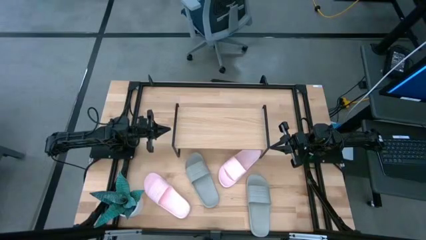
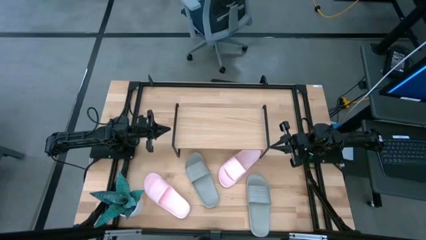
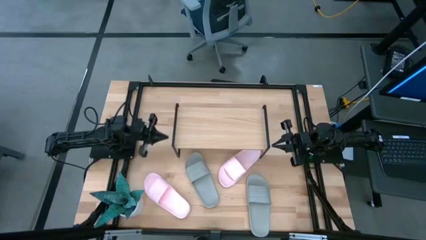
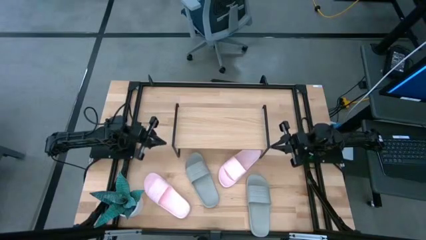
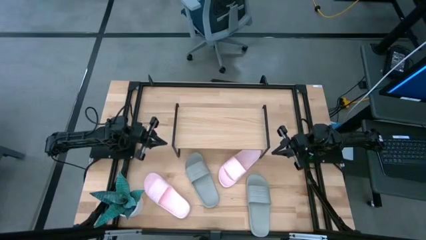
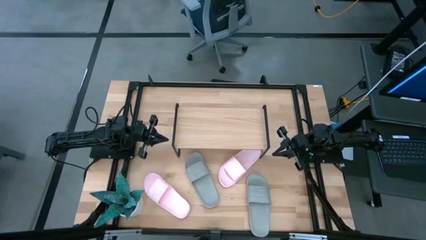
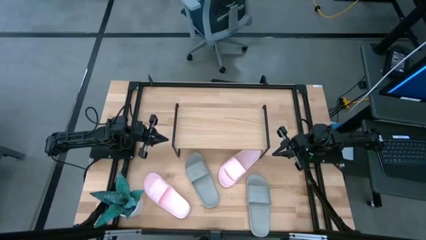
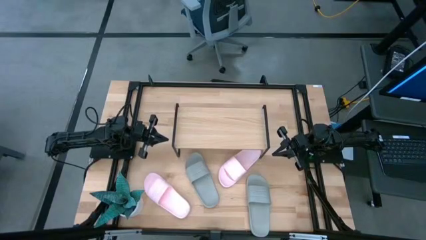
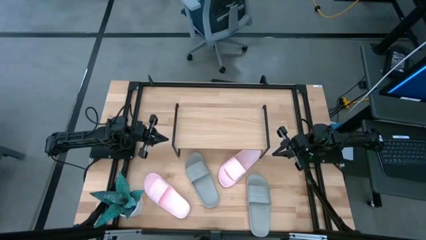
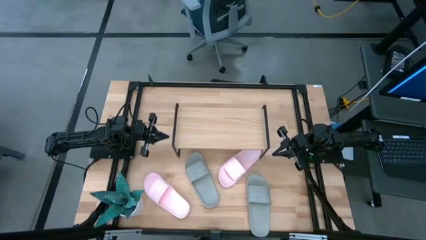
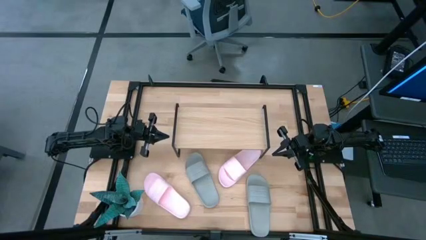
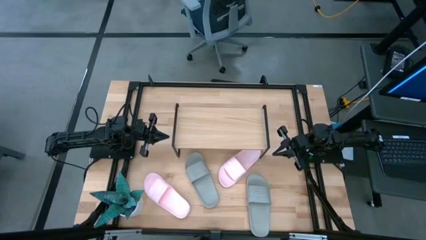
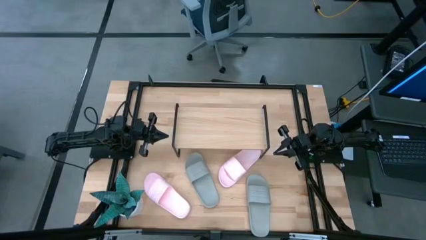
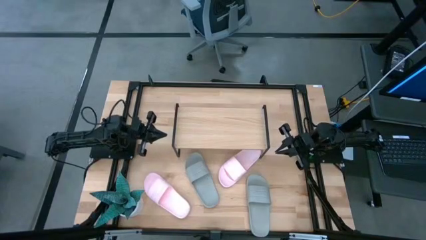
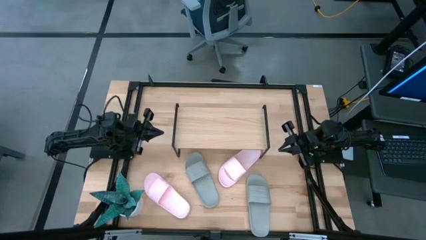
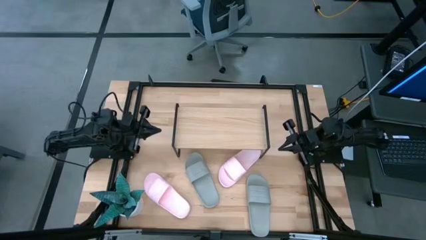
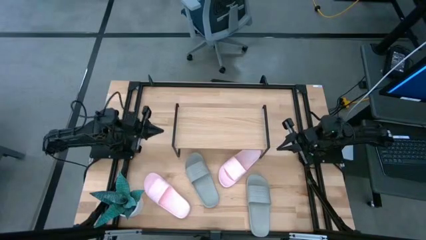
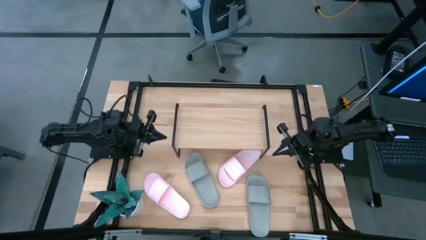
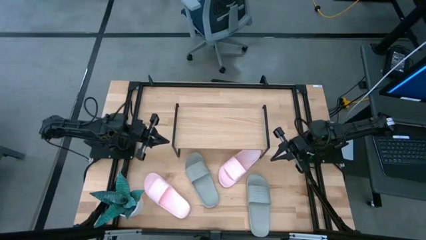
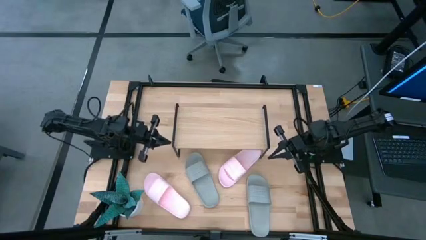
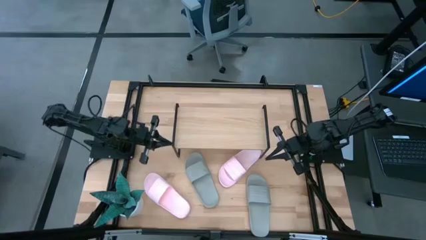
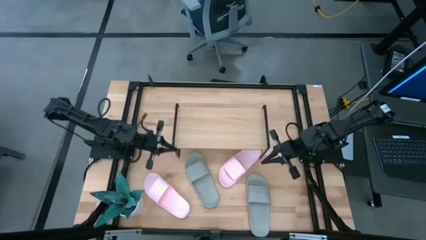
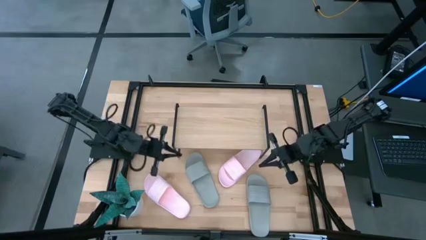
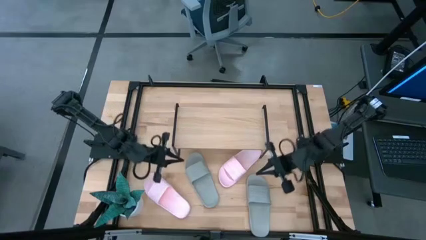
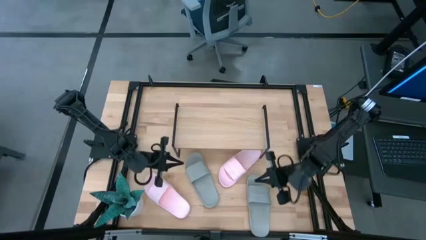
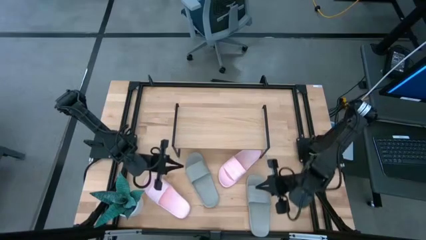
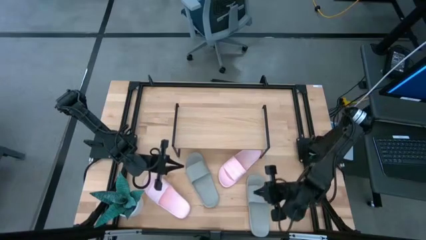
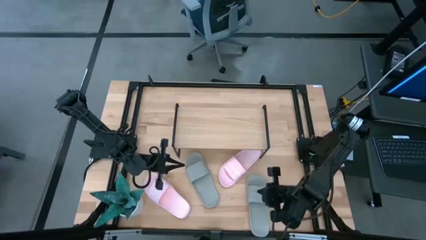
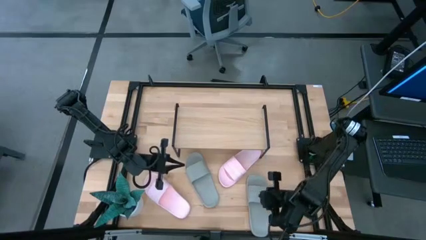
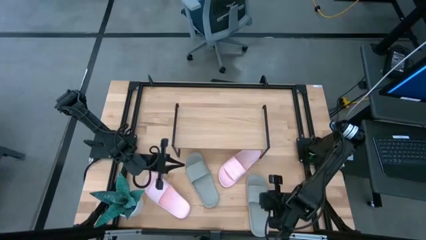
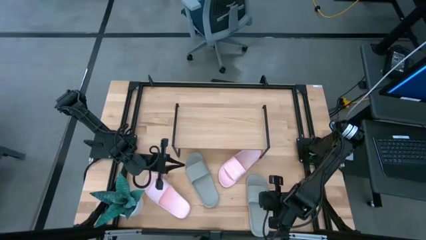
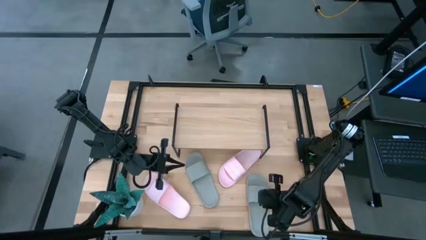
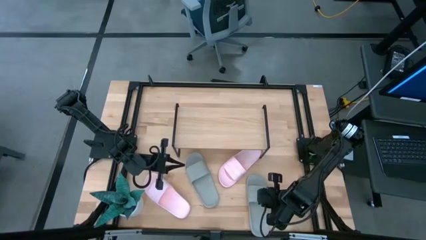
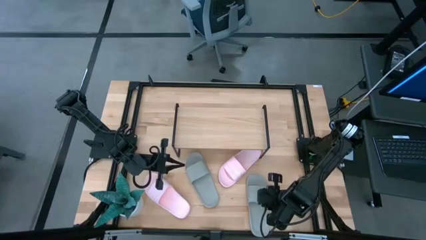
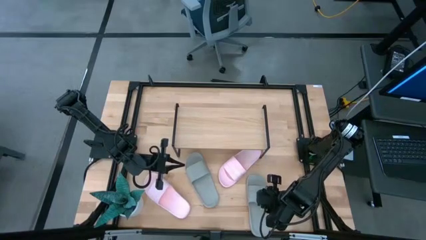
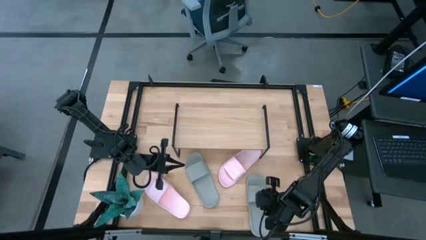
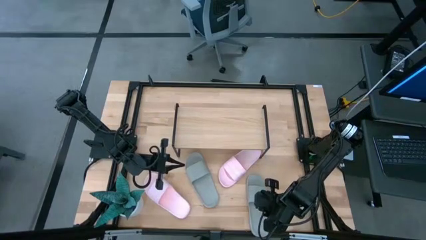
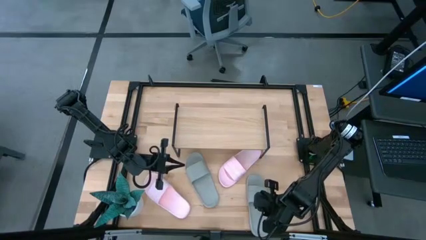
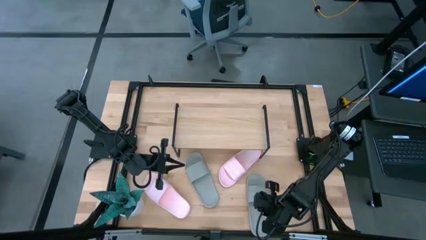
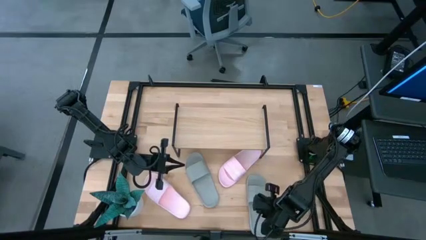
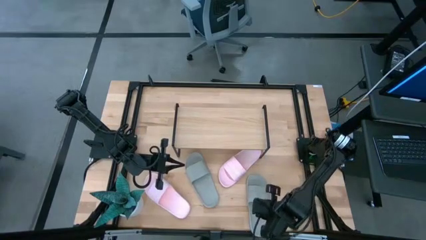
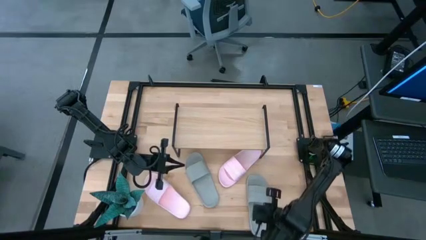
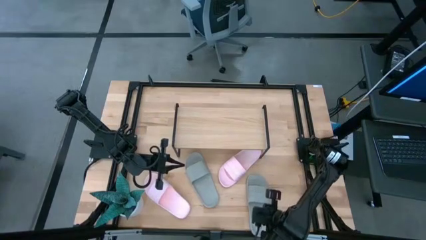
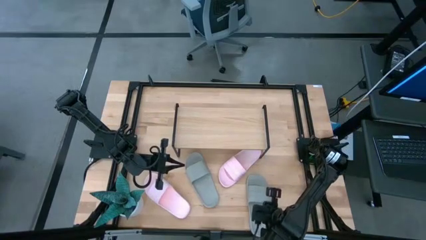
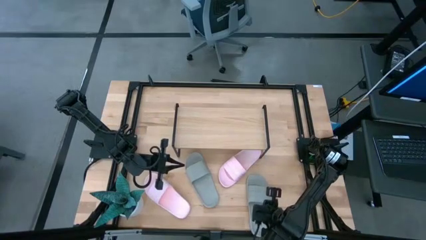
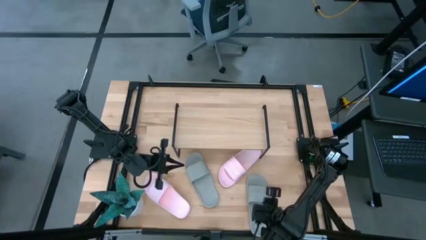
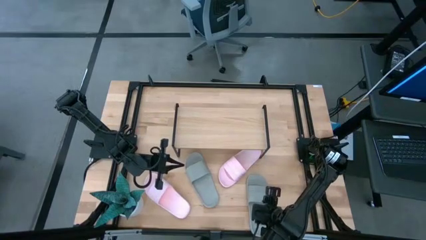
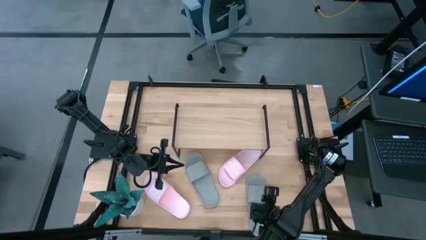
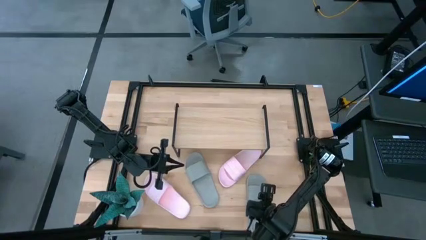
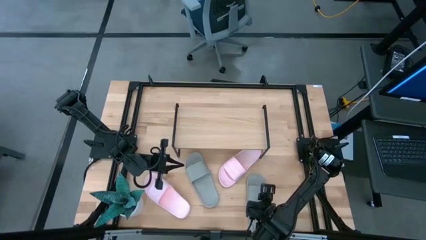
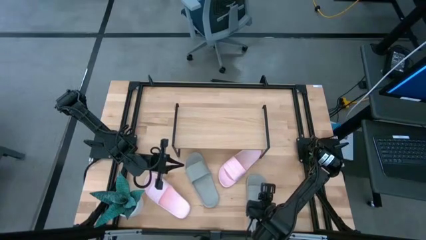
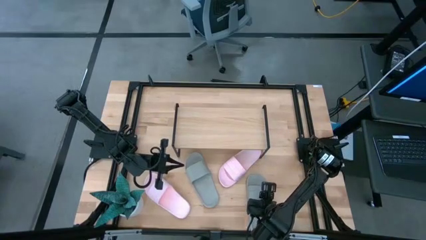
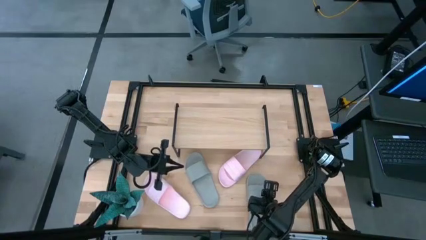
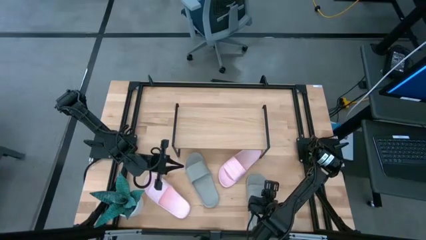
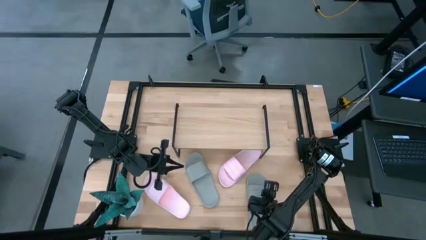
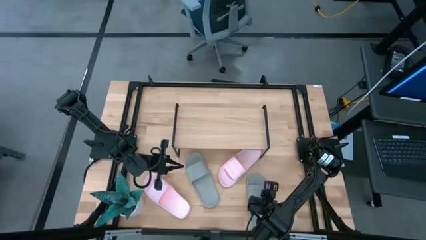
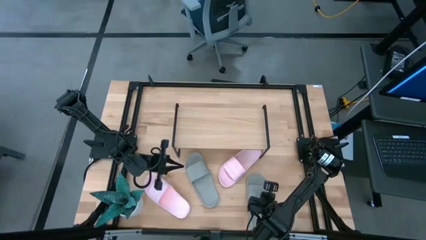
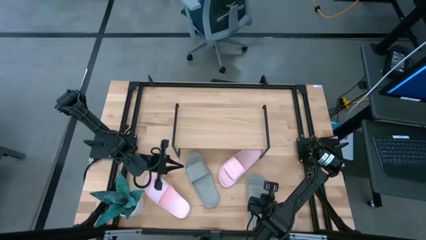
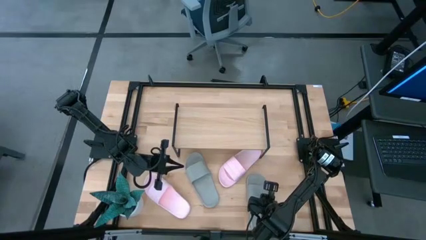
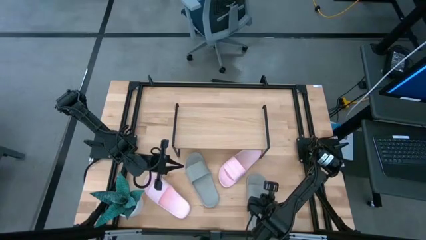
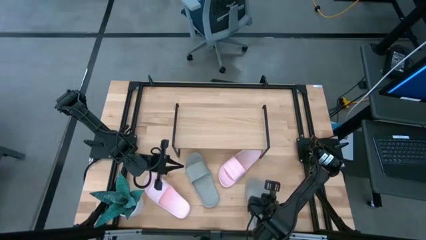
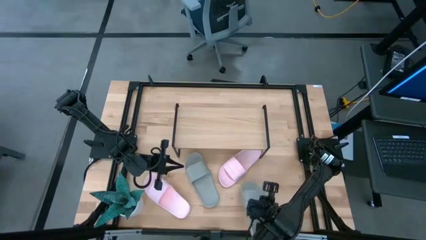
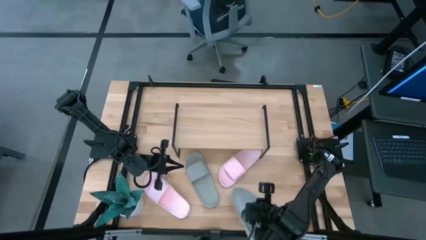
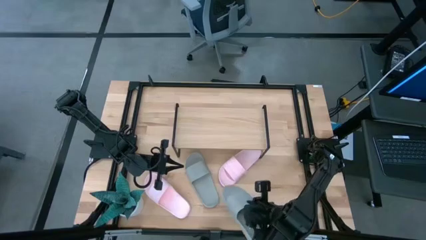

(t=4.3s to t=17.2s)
Task: Pick and place slides into the shelf
Put the right gray slide on the shelf

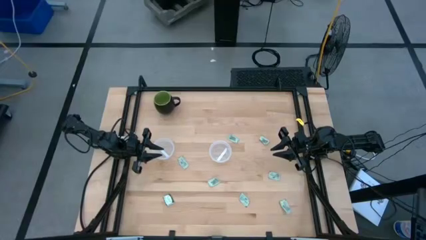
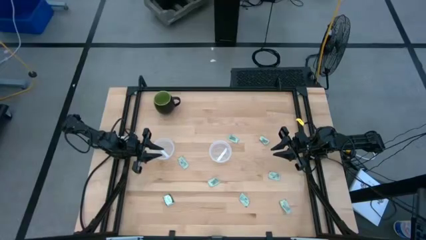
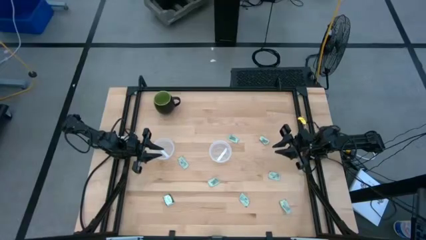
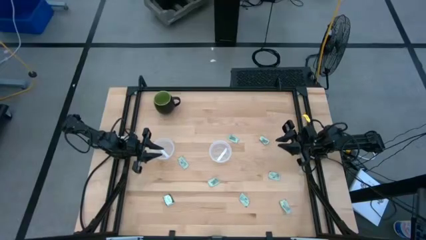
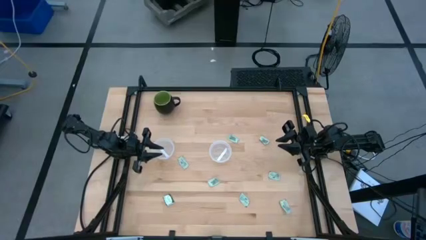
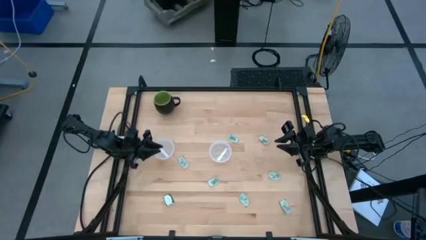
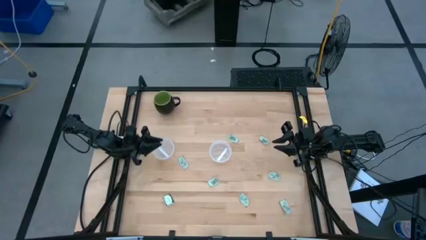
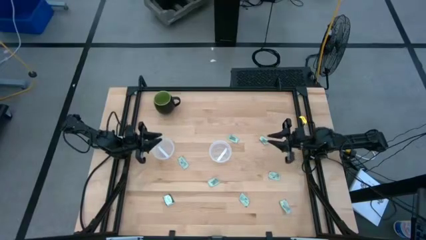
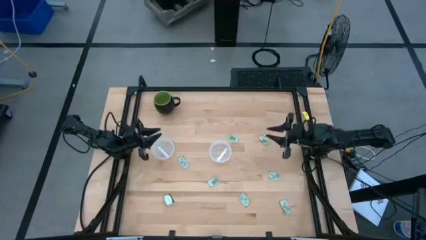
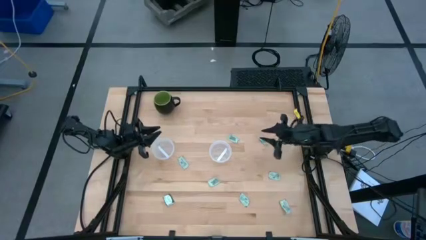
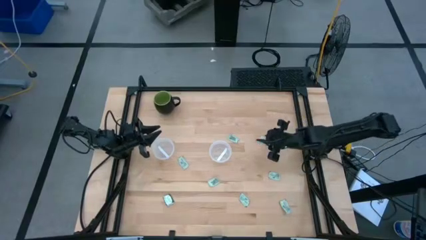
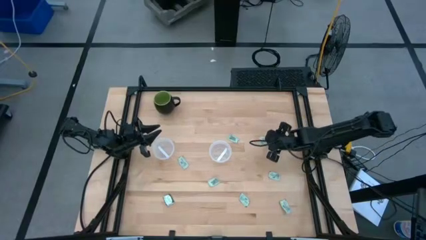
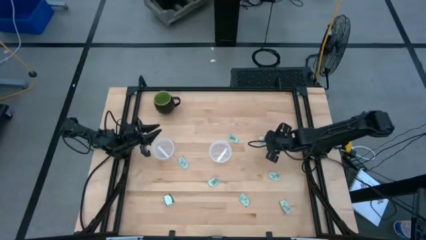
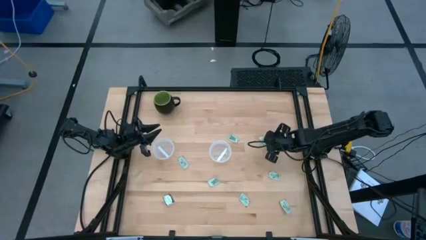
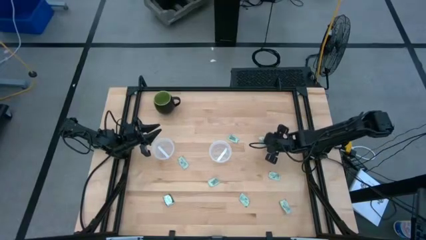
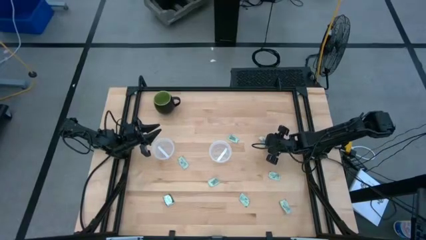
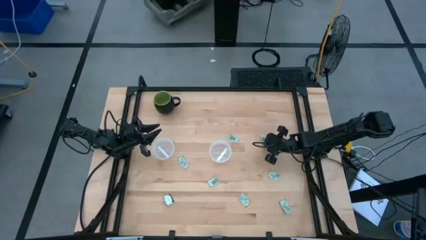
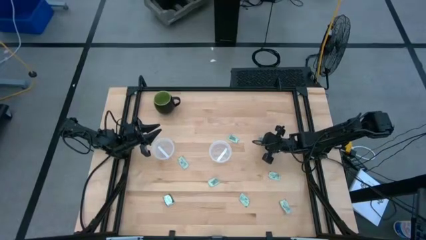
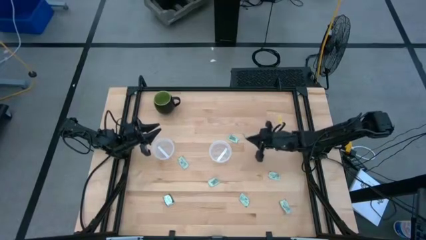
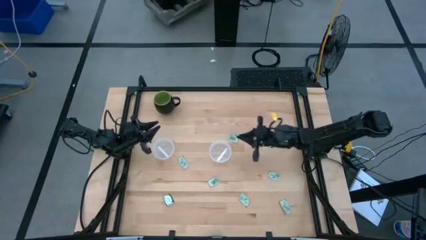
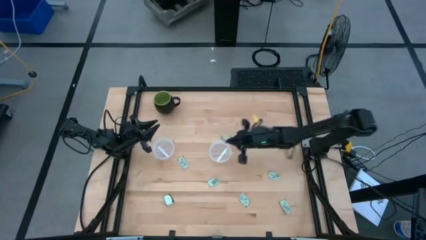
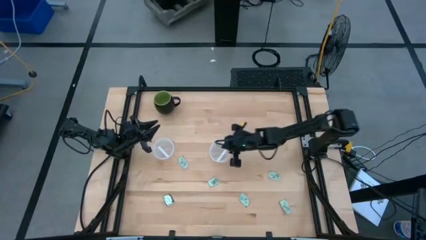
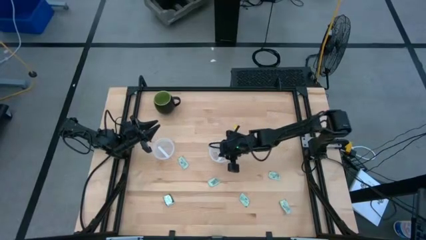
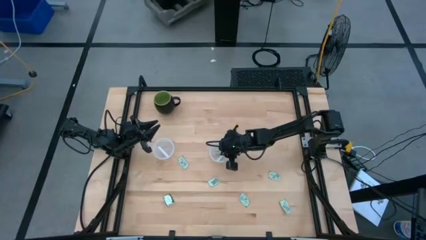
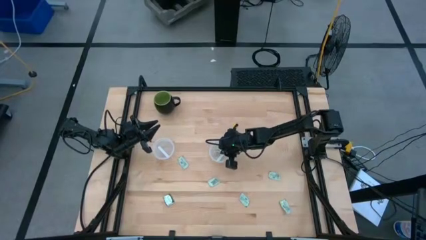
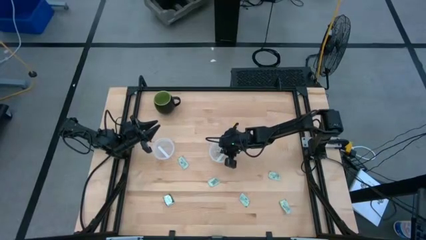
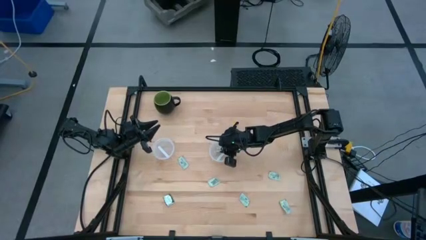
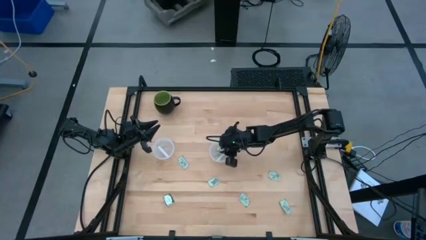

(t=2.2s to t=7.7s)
Task: Pick and place Stevia / Truvia into bins
Put the white stevia packet into the right transparent container
